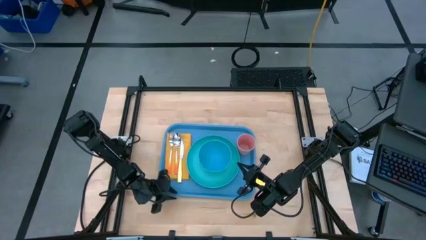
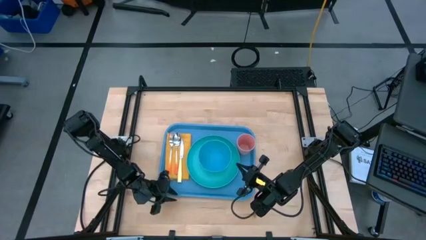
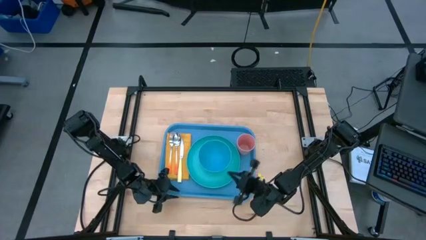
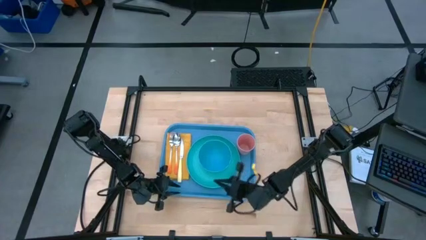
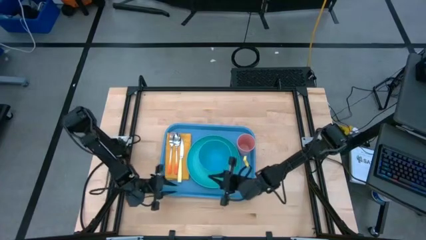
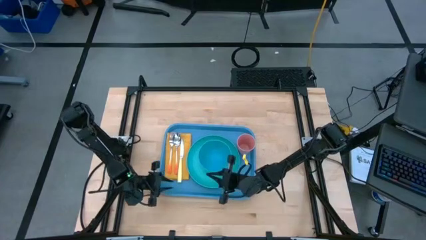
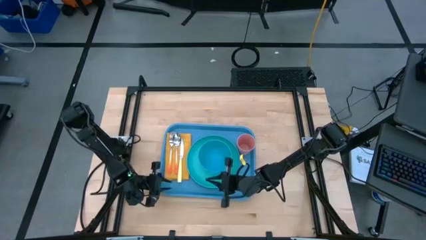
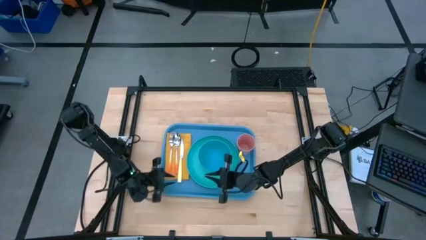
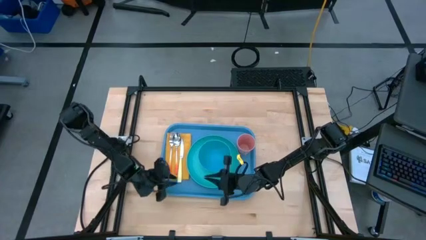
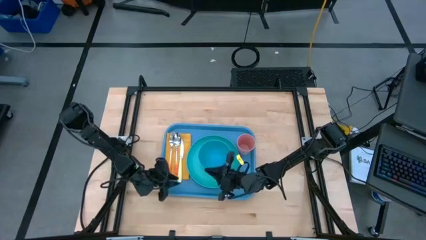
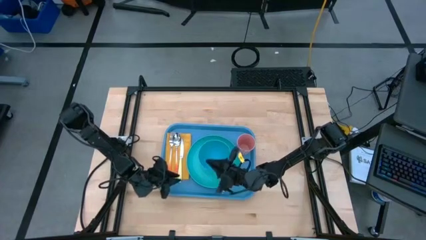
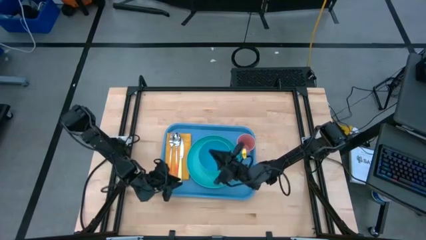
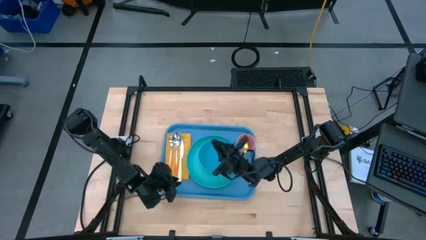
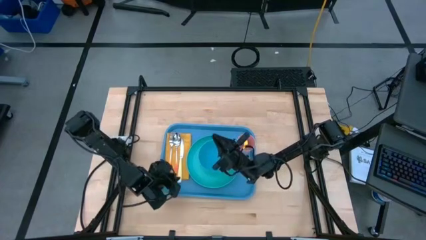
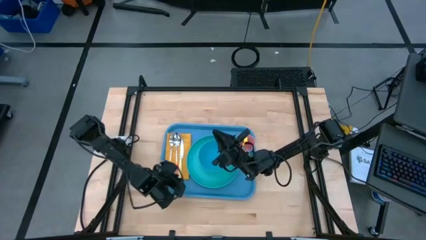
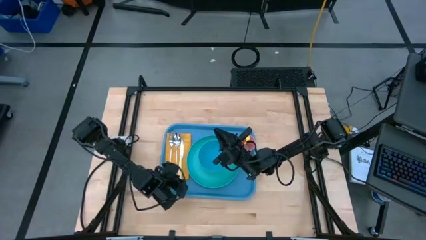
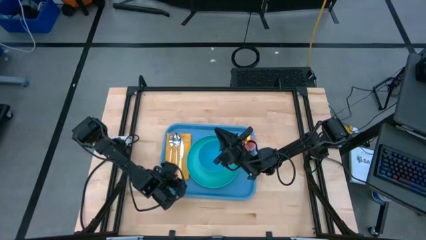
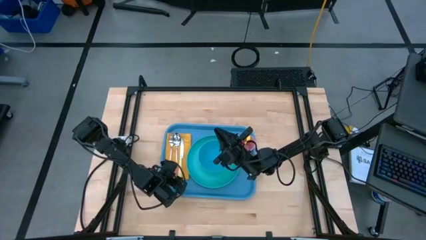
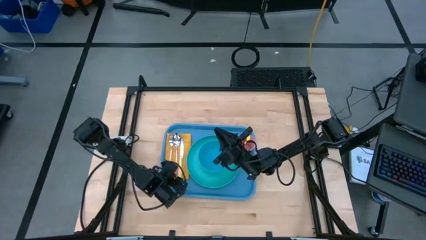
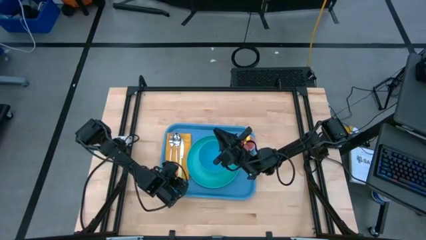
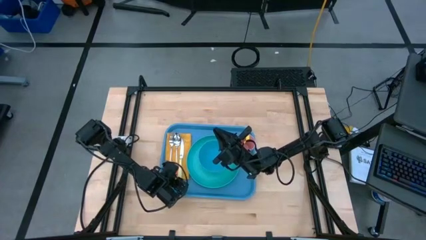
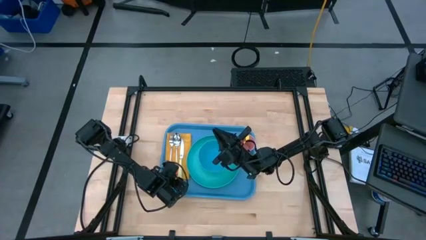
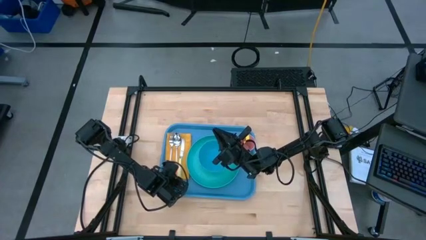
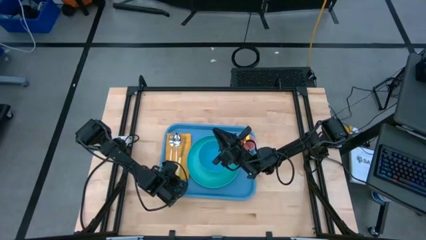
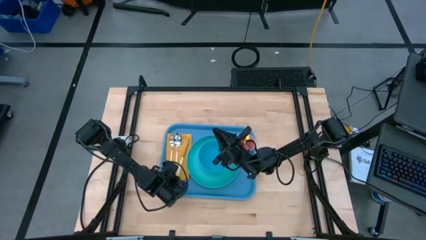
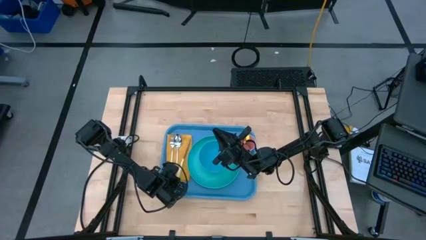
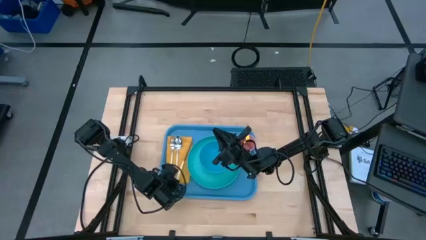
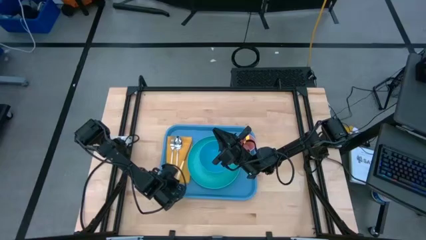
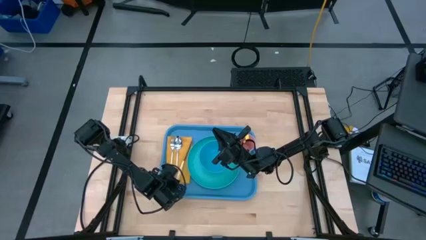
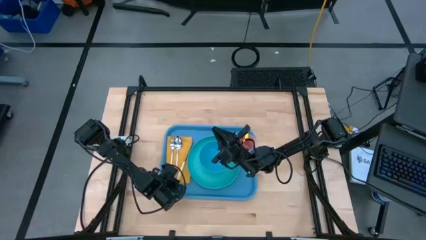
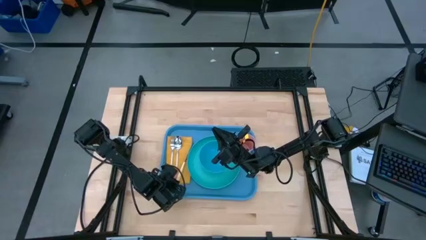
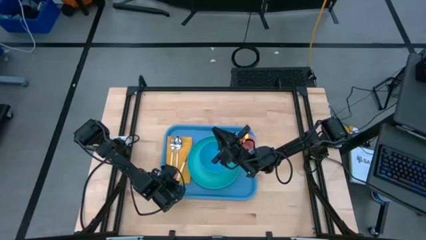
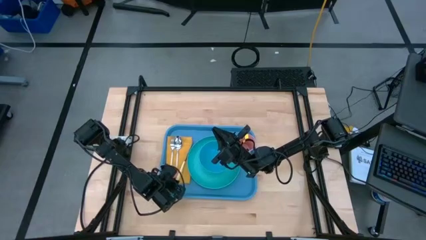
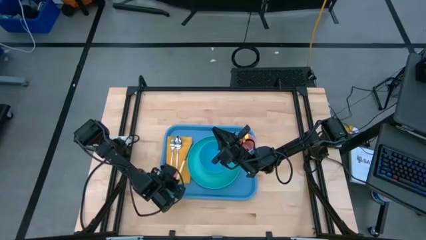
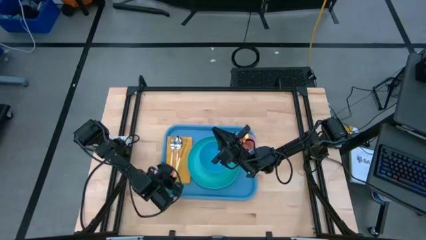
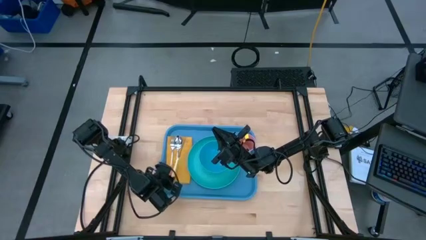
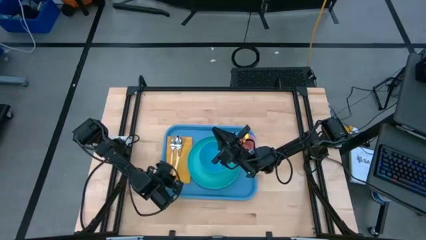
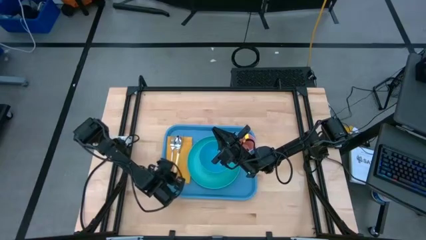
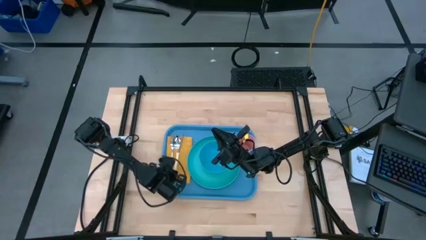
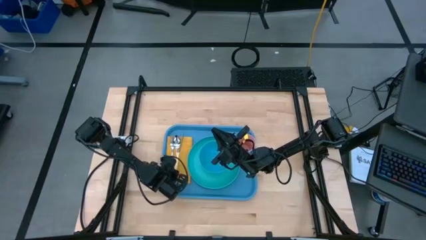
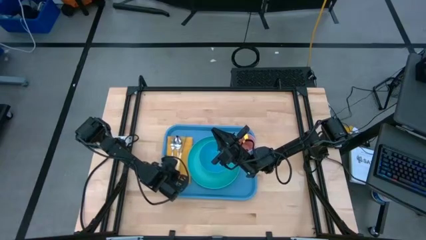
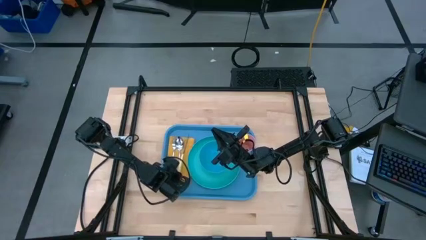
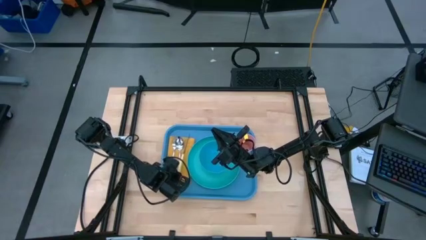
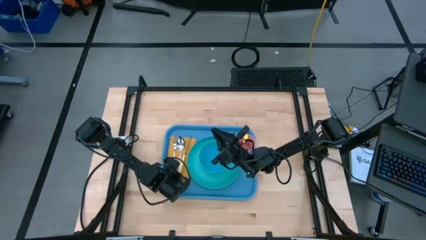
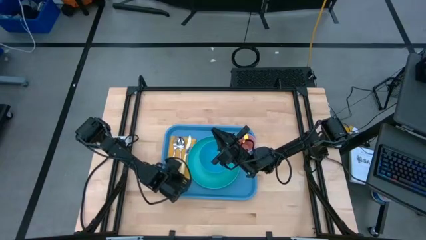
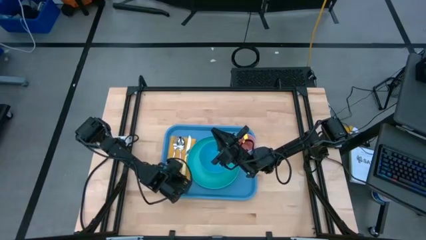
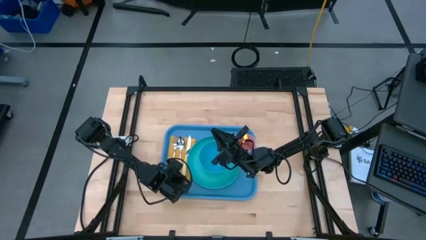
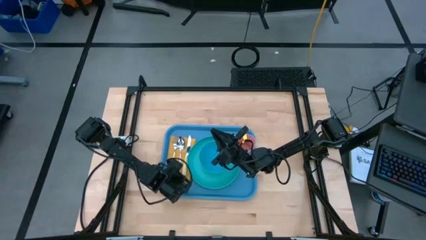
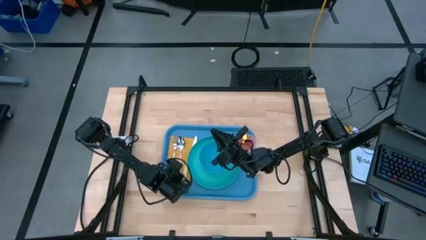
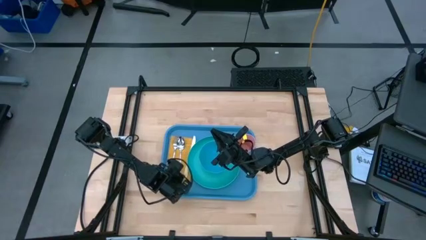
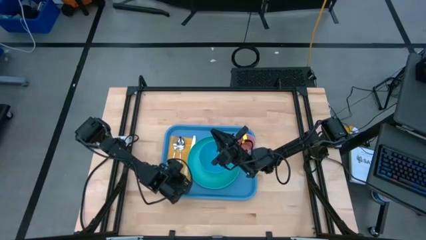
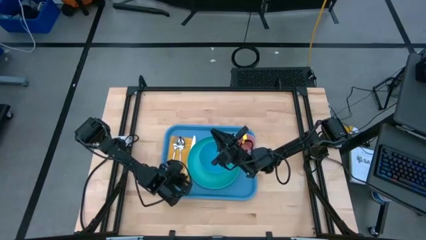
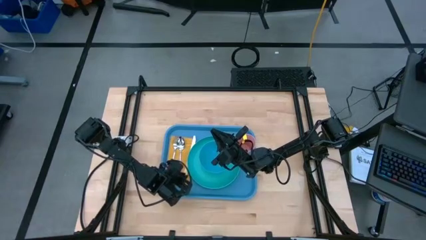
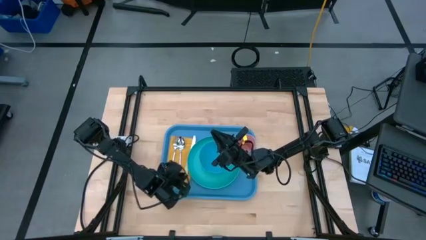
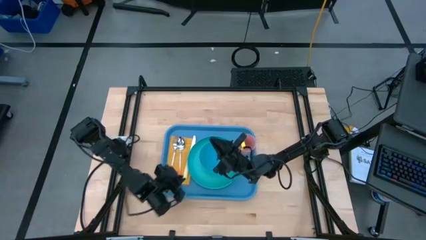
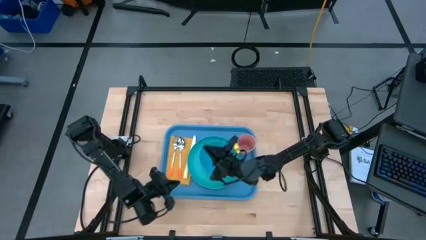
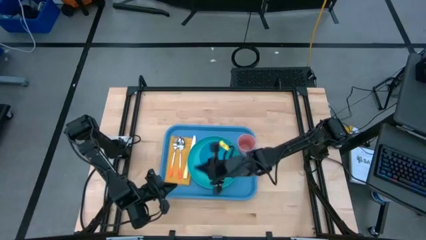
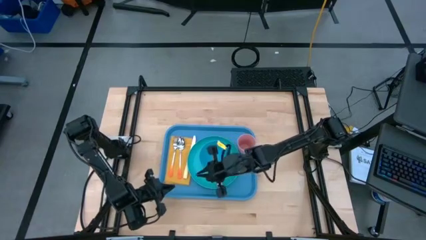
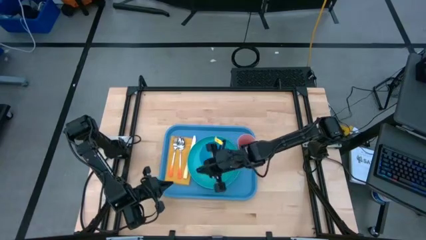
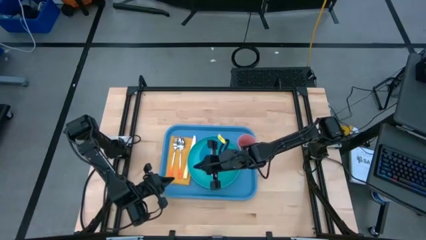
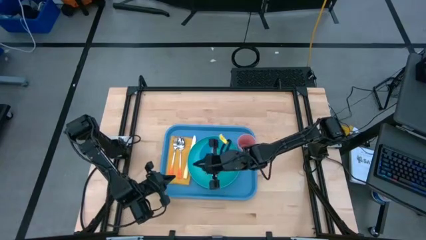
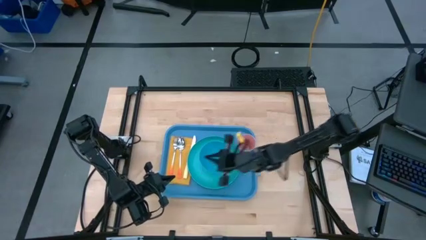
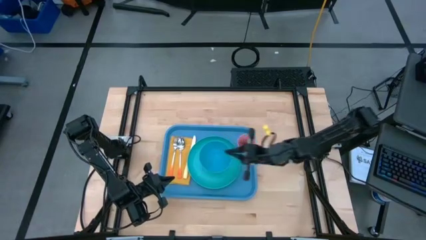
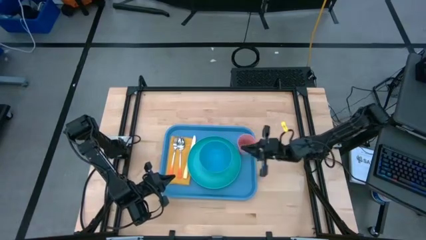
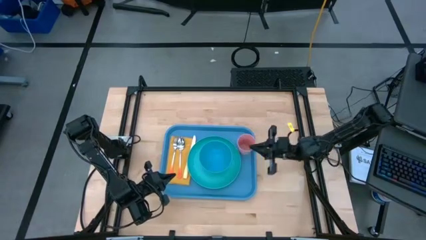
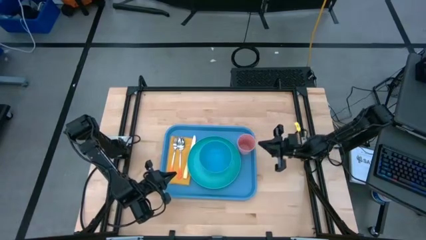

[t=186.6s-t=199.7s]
Task: Set up tray
Adjust the yellow knife on the yellow napkin on the blue serving tray
